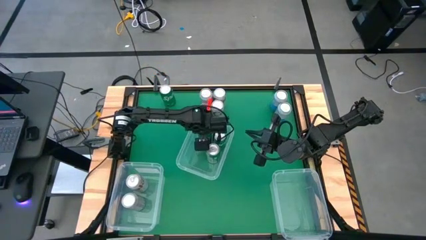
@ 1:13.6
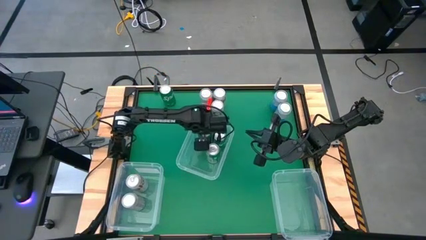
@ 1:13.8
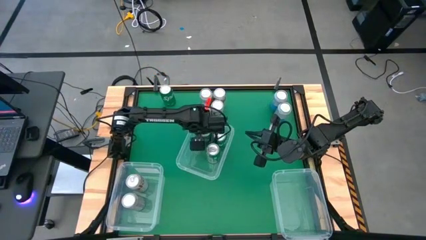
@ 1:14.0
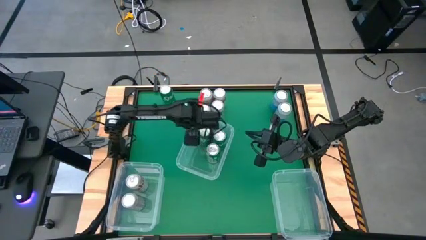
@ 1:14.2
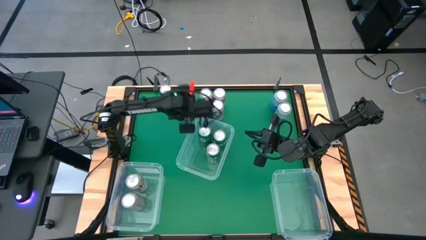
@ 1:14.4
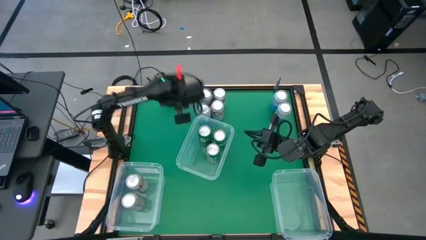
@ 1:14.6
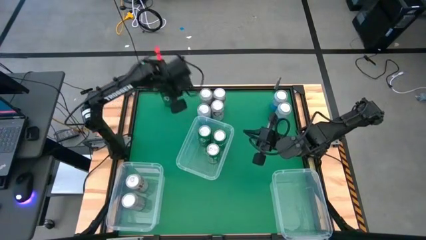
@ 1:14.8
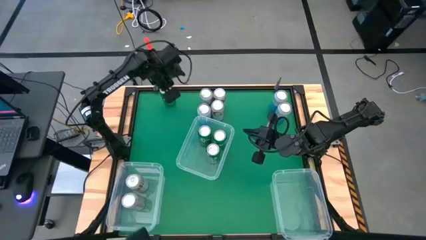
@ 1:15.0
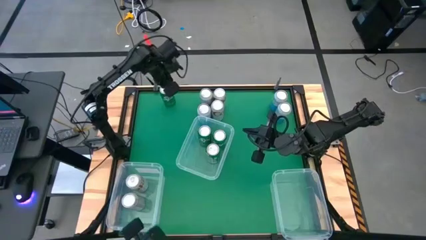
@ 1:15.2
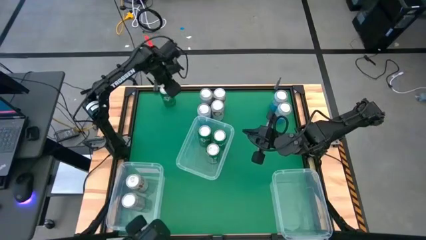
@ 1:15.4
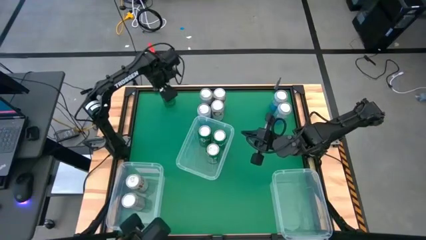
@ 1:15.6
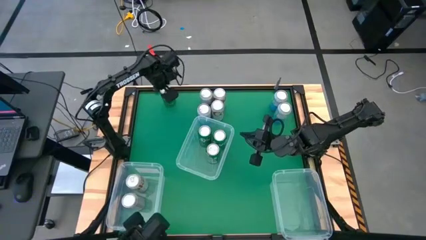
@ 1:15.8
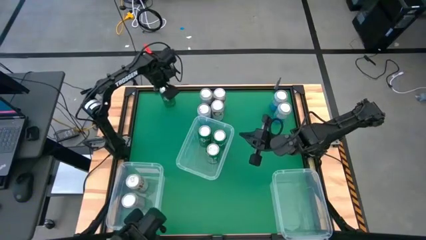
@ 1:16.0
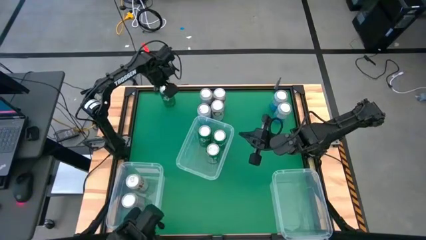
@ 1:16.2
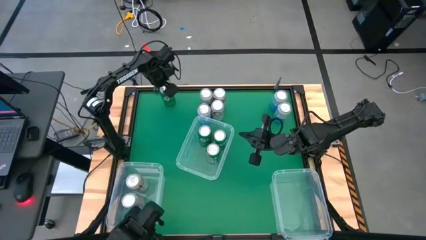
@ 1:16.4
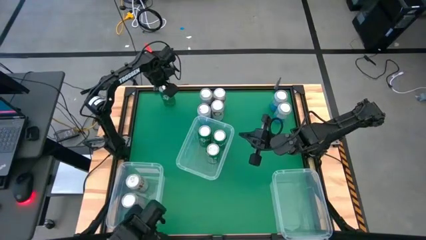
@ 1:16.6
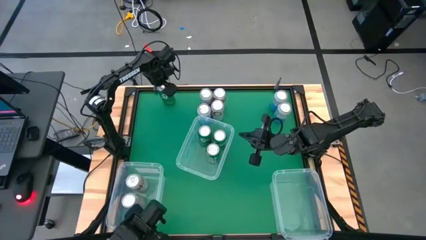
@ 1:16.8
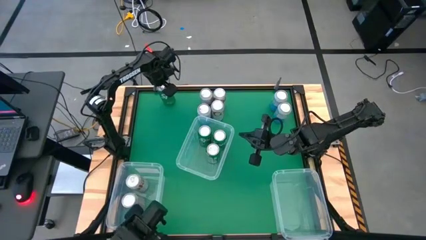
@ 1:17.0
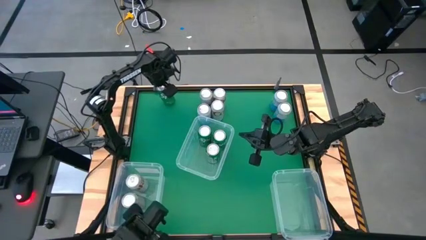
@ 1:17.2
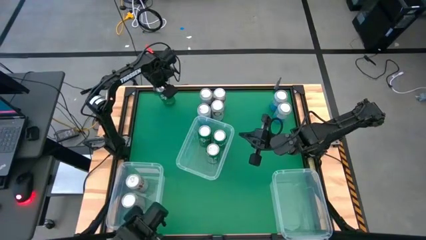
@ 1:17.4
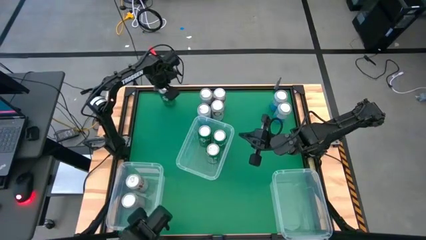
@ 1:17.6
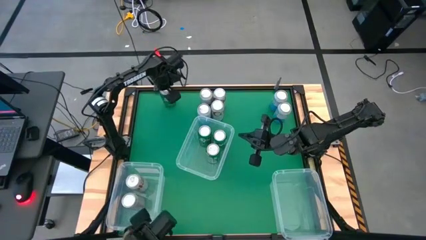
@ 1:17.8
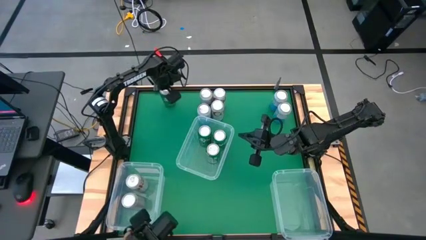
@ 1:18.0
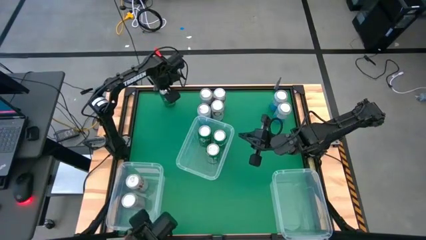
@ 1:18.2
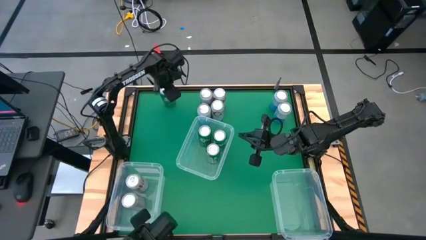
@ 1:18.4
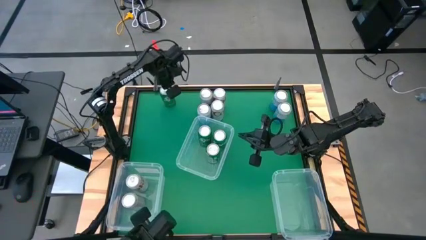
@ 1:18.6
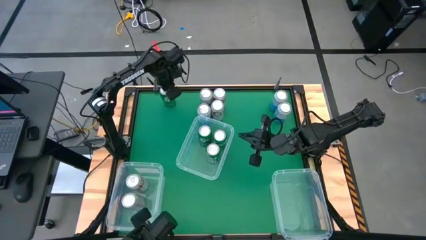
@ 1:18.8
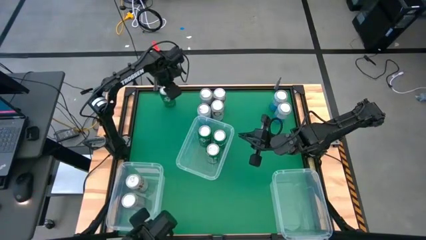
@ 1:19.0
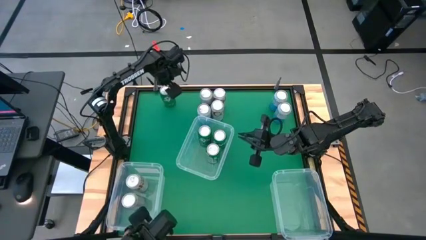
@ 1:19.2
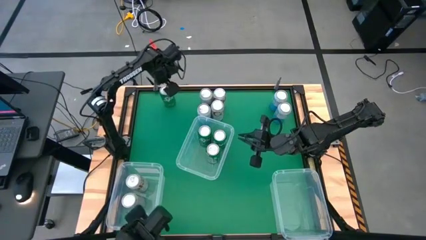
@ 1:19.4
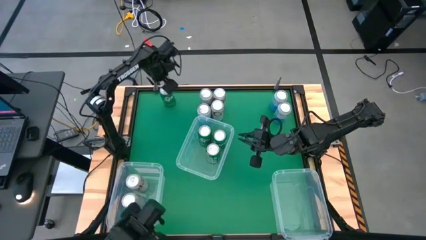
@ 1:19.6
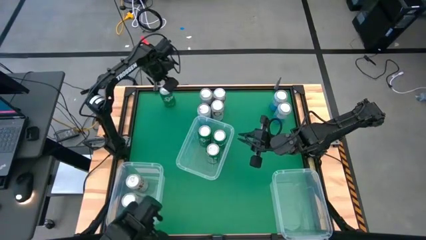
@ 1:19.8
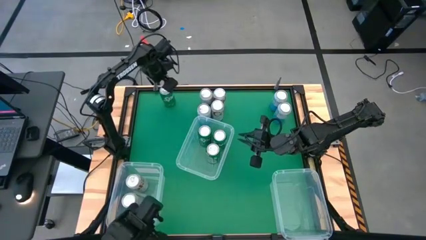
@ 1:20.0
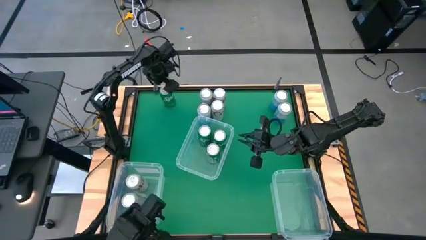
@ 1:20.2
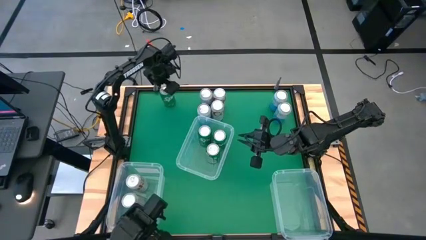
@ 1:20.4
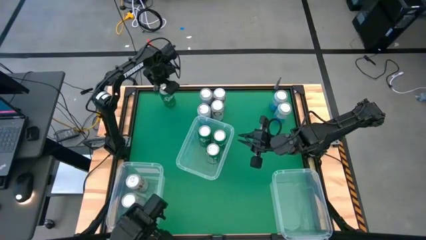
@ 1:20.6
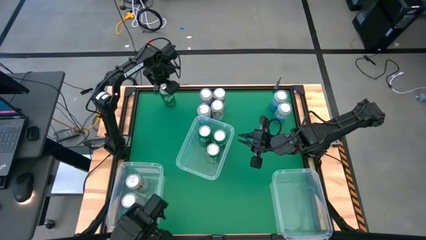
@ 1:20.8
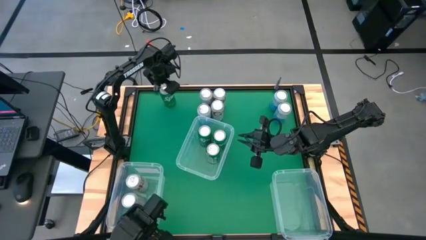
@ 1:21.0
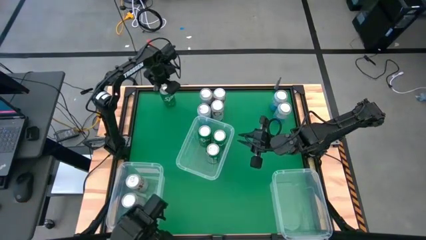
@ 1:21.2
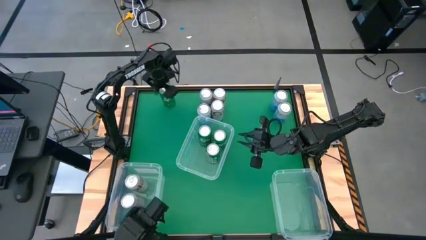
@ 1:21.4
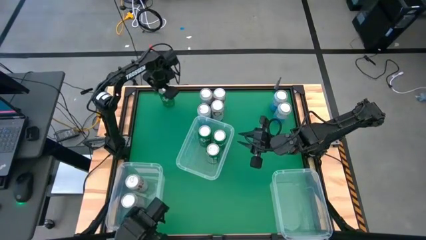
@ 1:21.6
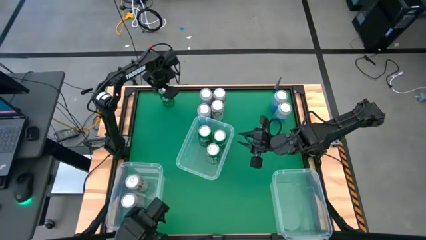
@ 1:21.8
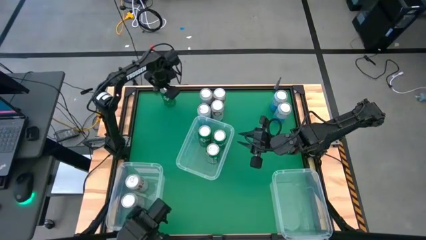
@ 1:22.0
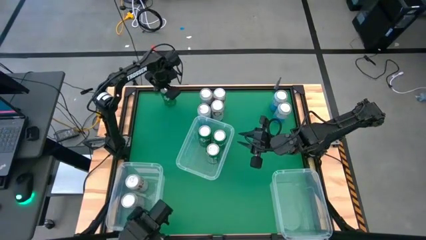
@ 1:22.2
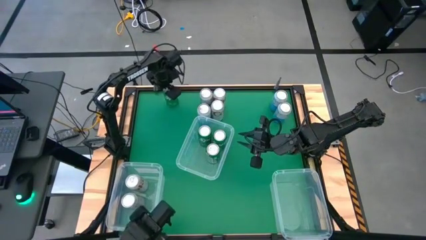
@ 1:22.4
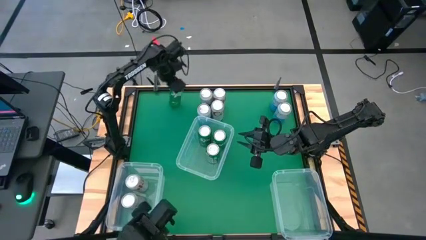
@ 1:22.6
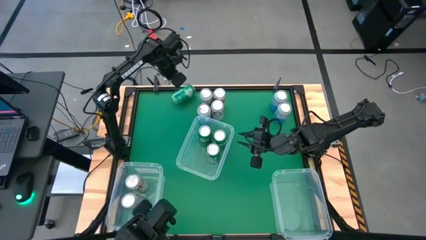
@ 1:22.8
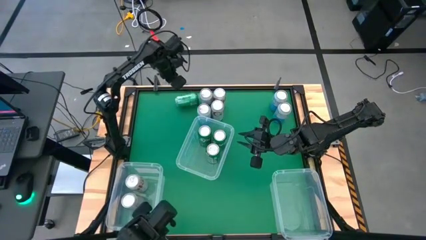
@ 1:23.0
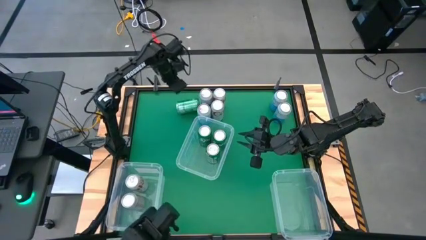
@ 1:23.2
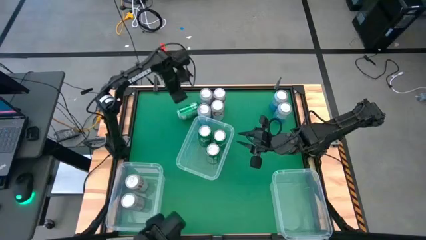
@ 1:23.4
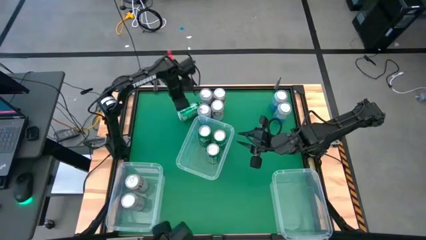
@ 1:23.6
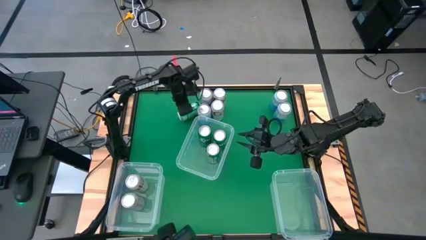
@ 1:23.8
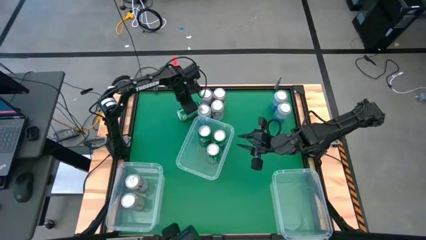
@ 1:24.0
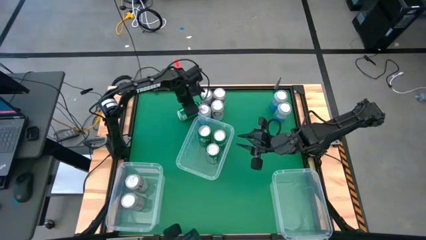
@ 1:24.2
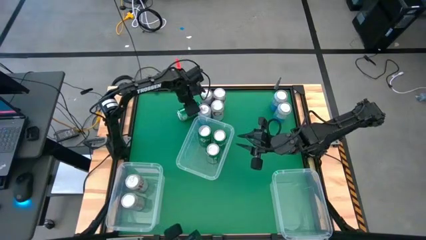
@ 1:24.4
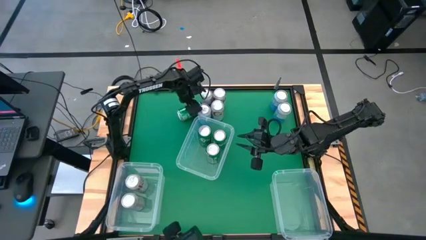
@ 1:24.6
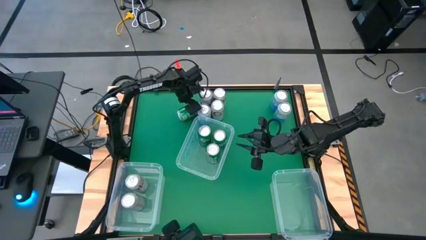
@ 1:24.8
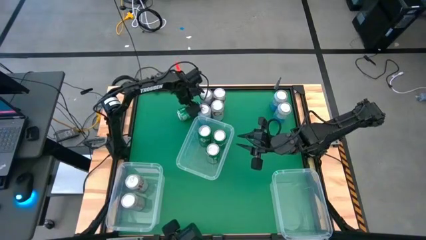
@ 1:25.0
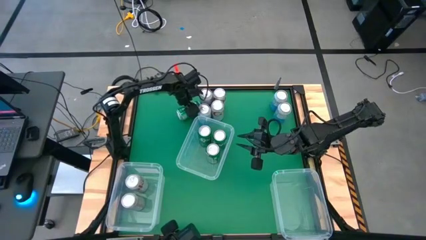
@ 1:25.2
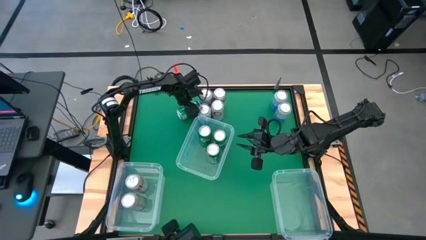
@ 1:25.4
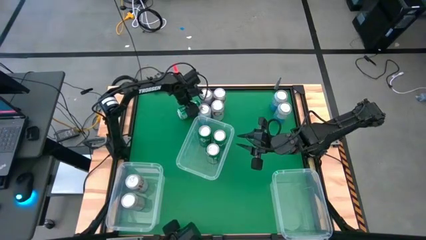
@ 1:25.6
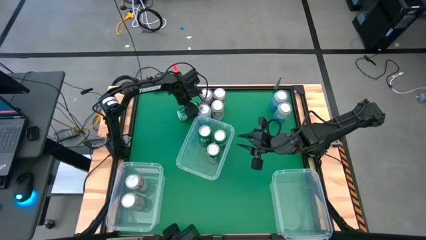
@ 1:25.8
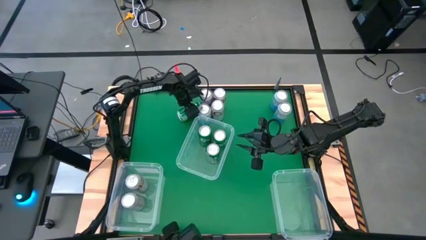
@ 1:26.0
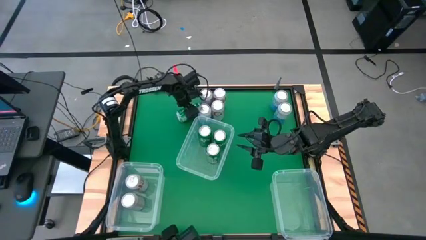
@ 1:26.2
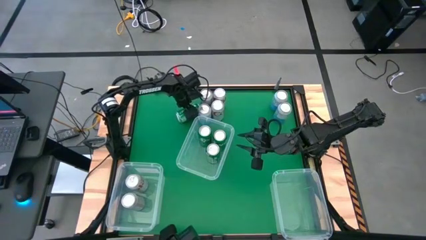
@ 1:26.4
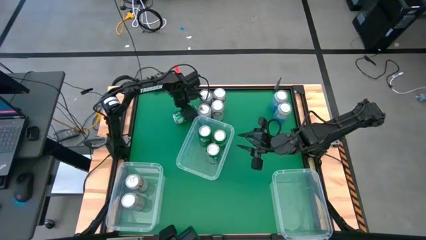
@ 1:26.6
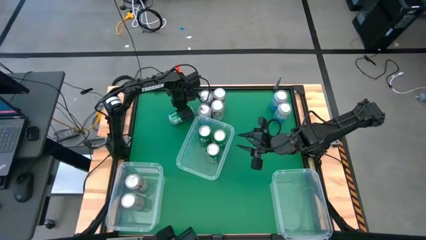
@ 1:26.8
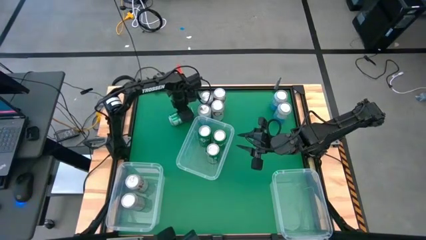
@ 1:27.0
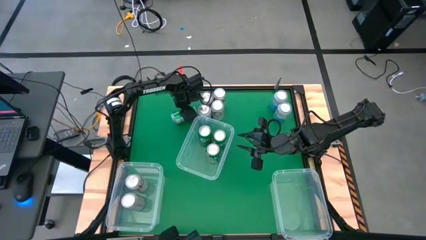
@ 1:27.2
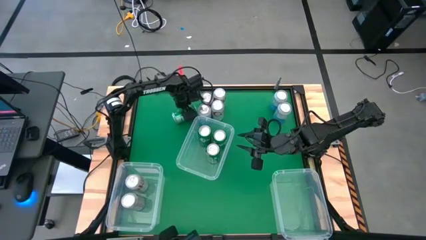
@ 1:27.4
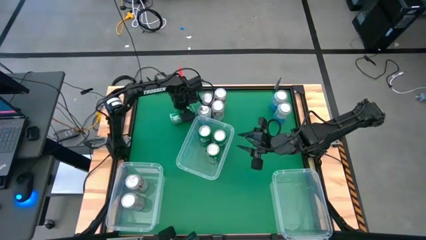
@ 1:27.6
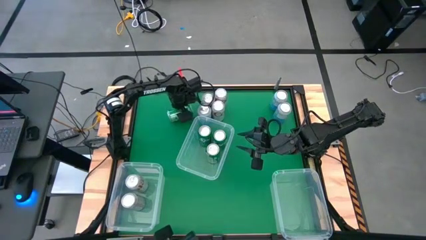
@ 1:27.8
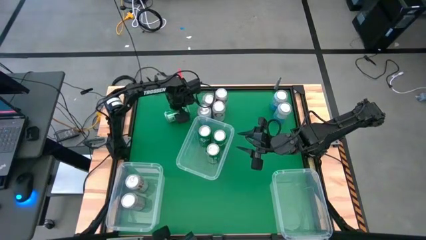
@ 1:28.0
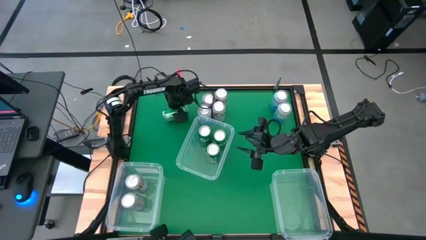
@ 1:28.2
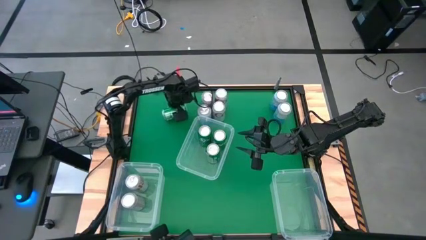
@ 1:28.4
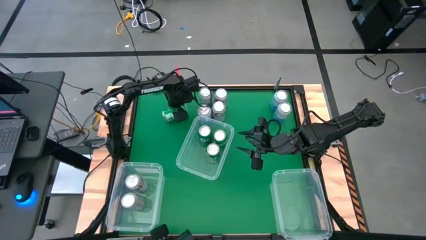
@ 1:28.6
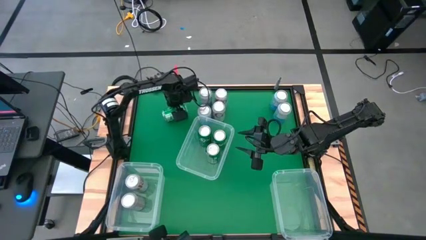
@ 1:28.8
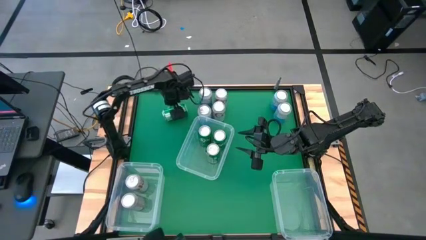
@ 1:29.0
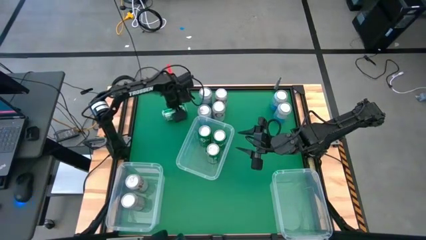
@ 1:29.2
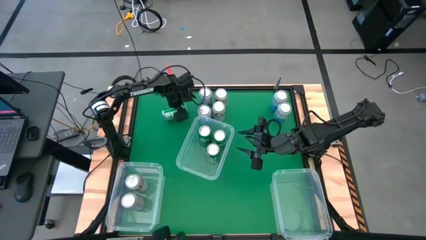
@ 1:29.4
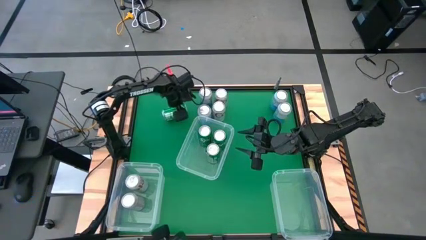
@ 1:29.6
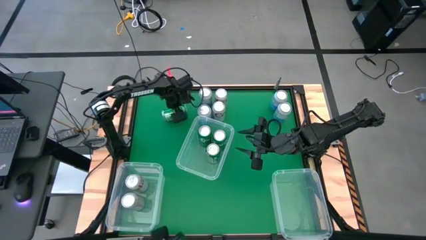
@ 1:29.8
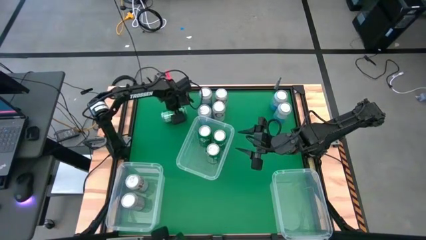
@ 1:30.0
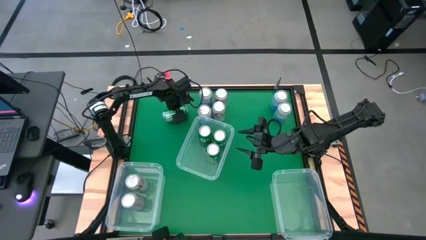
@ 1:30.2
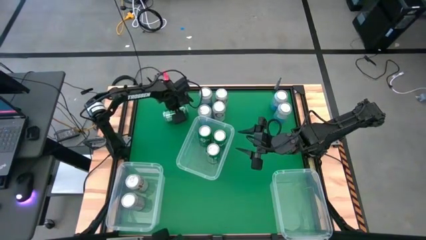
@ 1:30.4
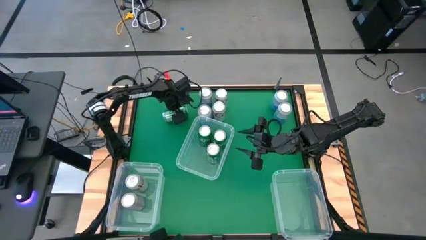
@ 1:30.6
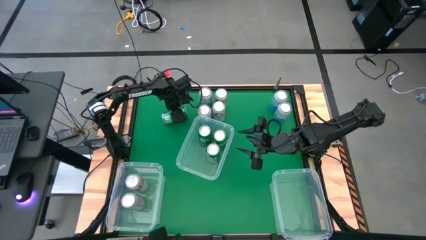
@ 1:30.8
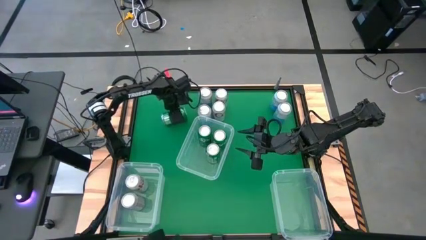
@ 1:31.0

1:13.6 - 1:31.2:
Task: Sort soda cans
Put the green soda can into the top transparent bin
